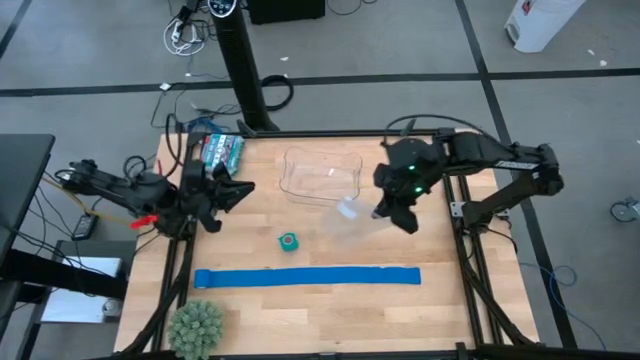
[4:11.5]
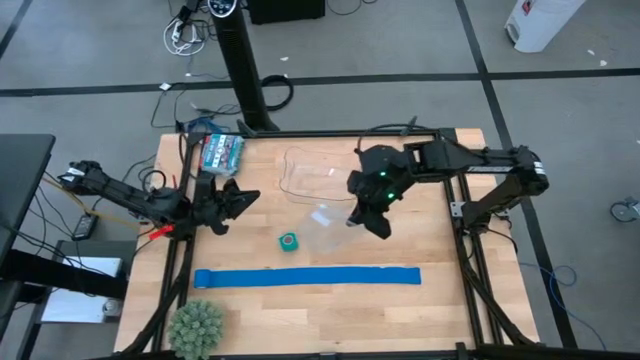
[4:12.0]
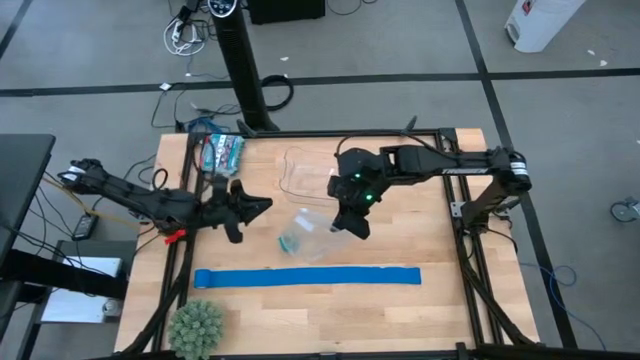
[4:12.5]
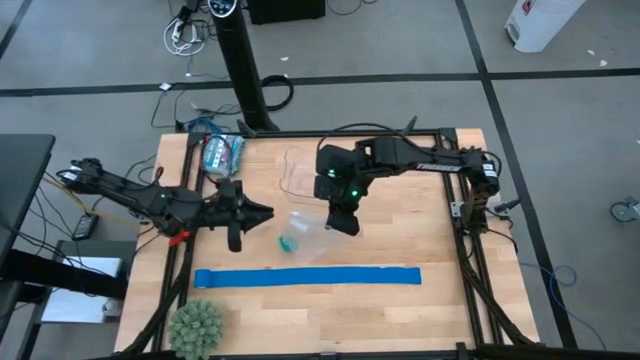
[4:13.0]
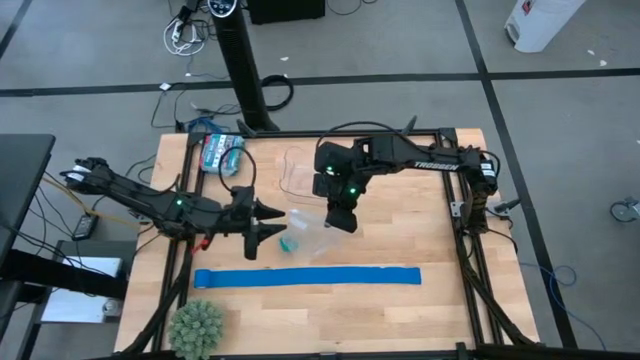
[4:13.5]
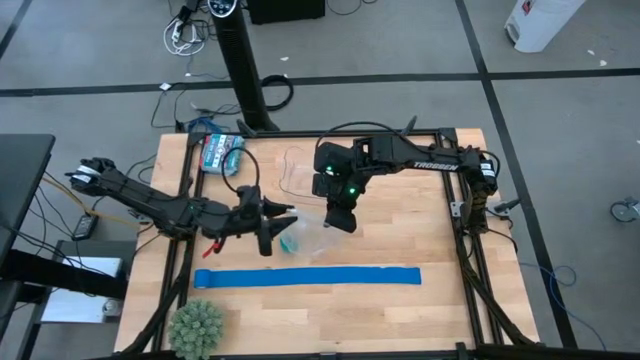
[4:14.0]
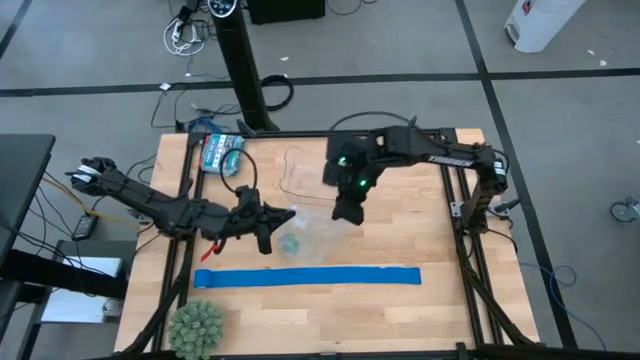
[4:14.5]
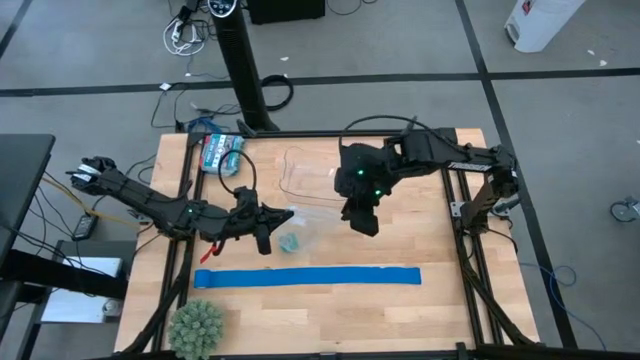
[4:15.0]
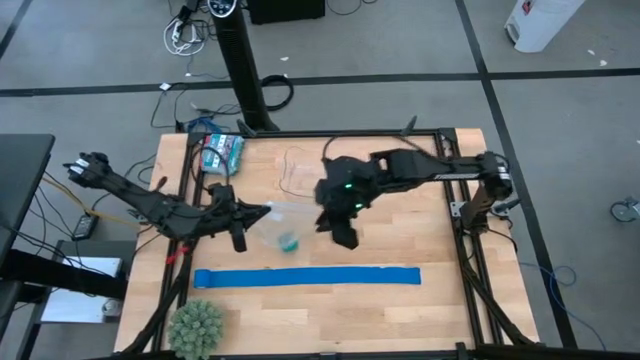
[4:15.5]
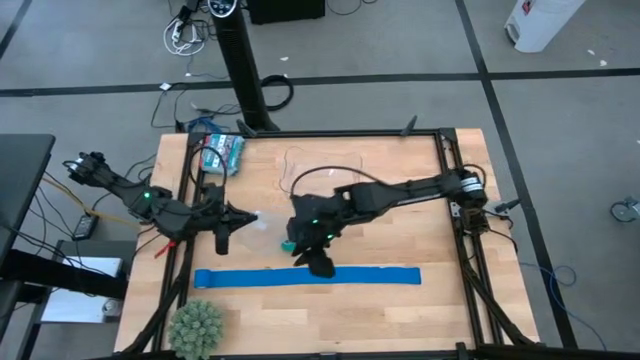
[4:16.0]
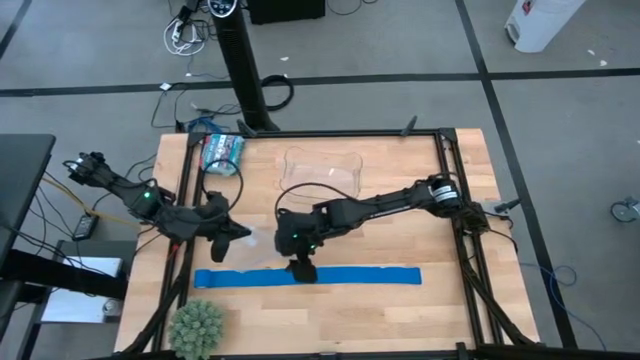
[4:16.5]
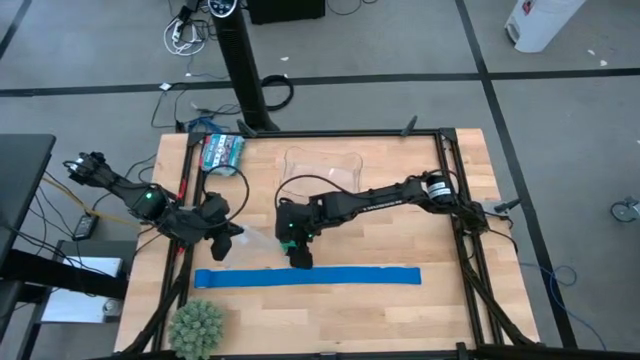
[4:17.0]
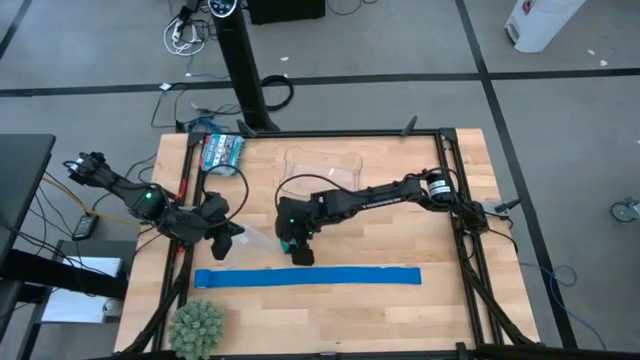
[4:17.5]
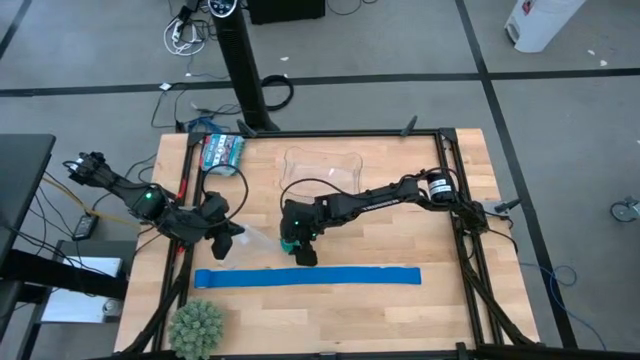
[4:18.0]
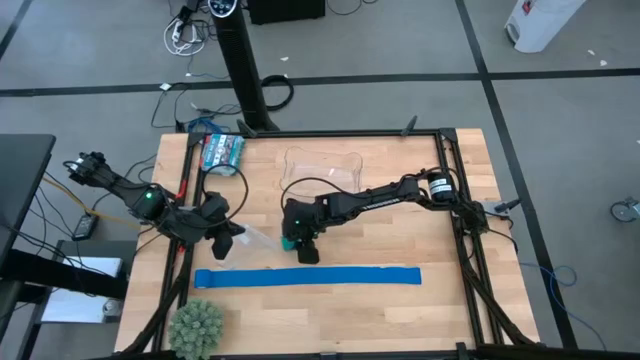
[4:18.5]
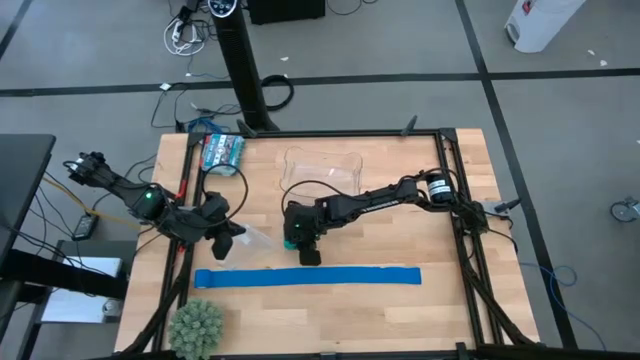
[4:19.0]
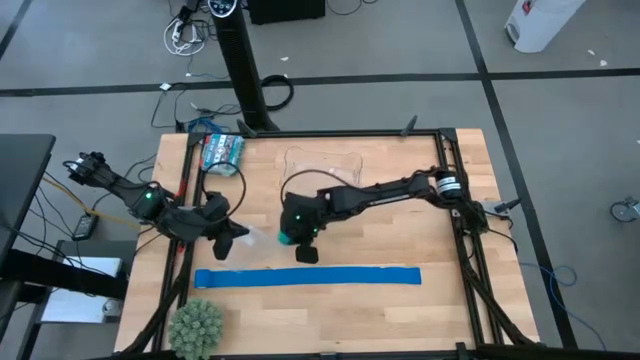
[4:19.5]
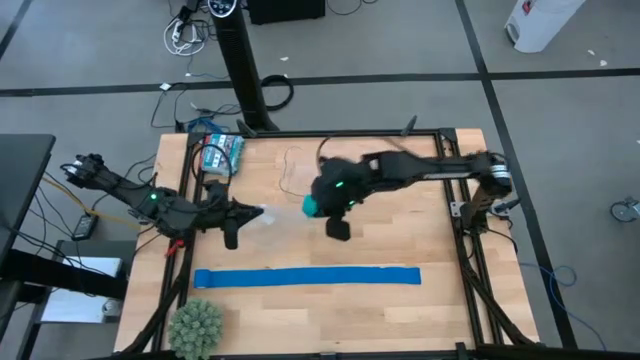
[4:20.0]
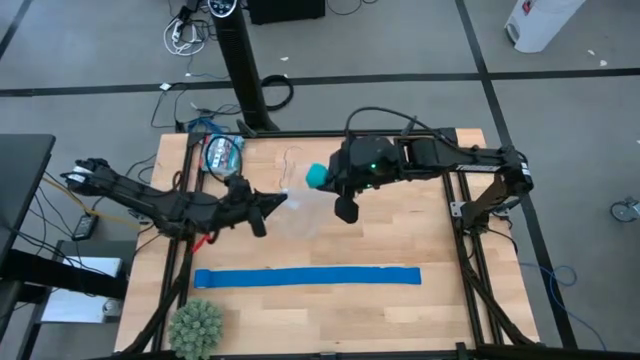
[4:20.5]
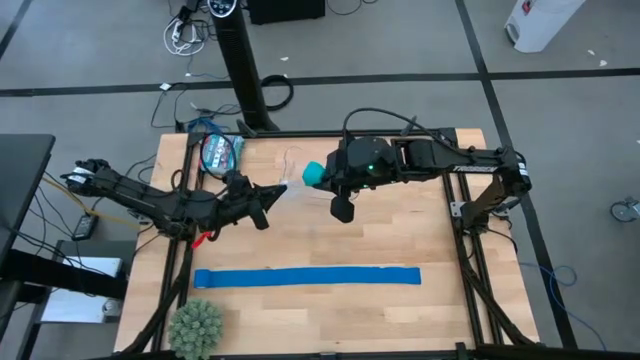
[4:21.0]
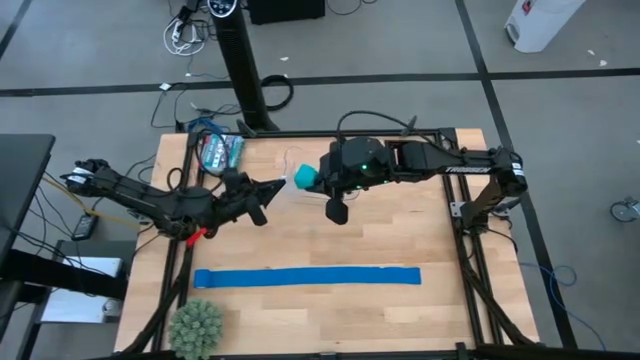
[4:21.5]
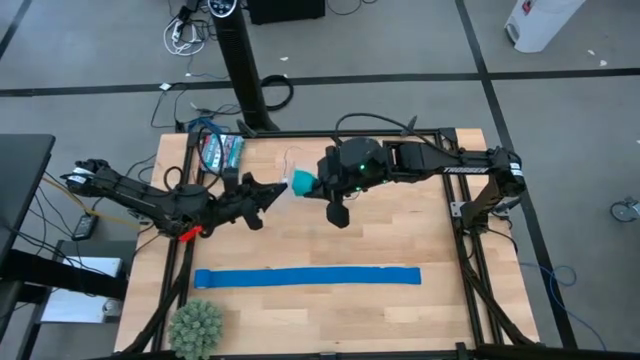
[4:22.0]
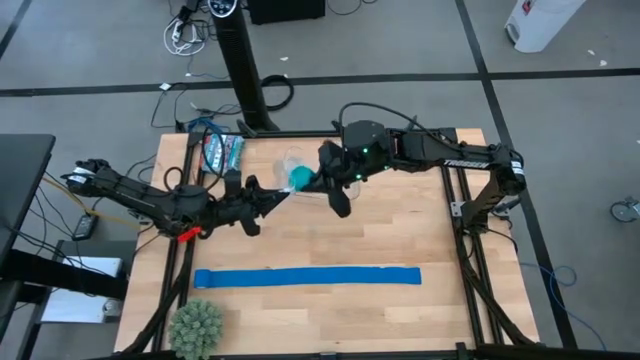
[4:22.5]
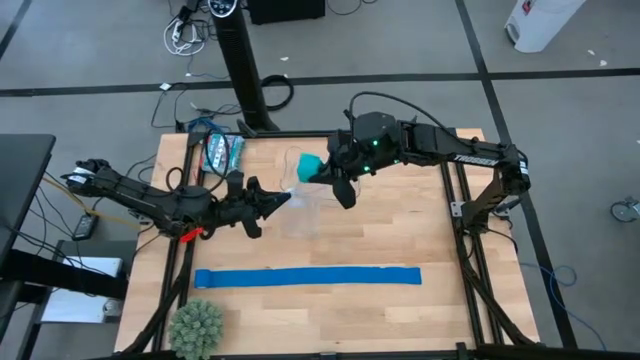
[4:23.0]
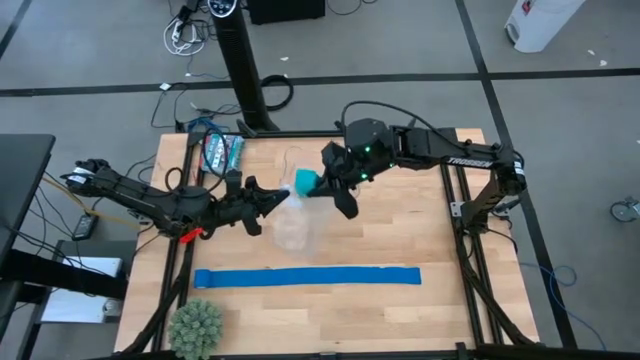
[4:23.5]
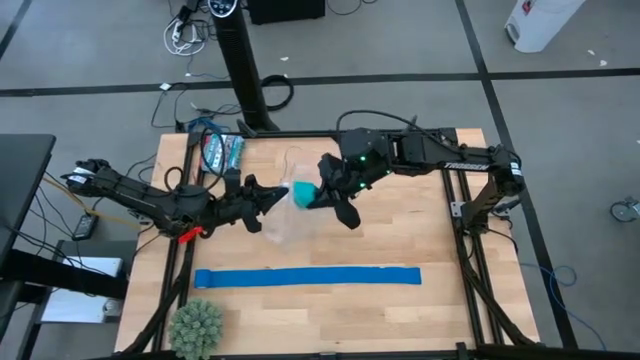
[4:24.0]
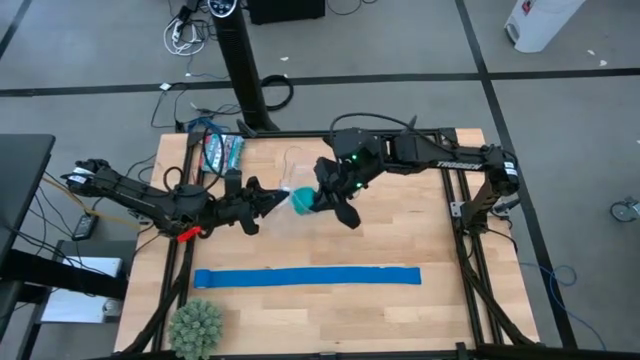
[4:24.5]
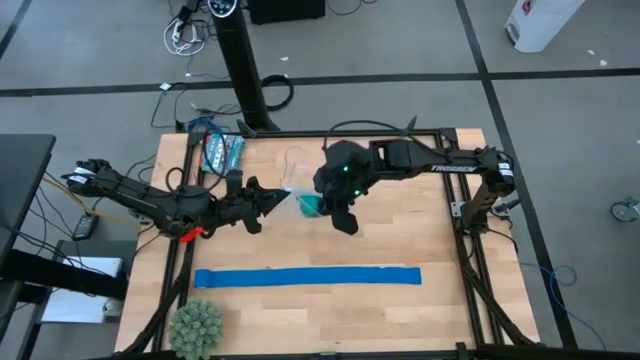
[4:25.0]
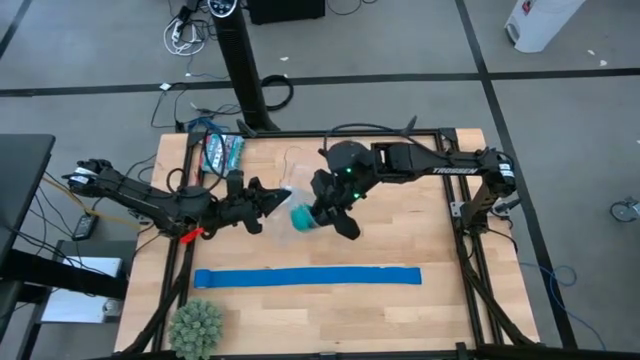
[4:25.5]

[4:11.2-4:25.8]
Task: Roll bandage
Put the green bandage into the transparent zip bag

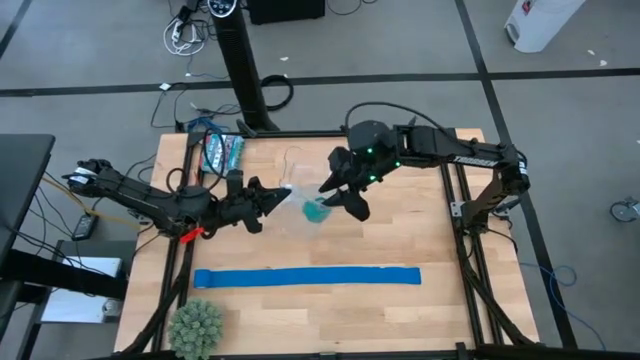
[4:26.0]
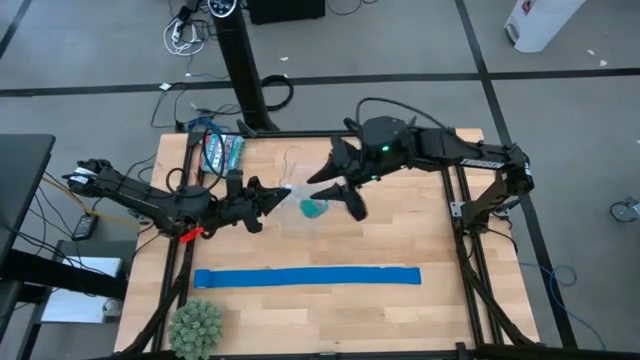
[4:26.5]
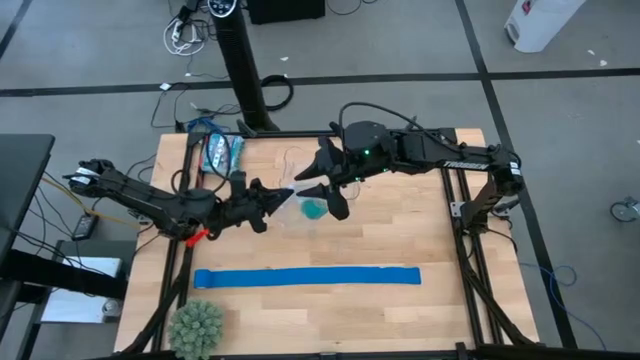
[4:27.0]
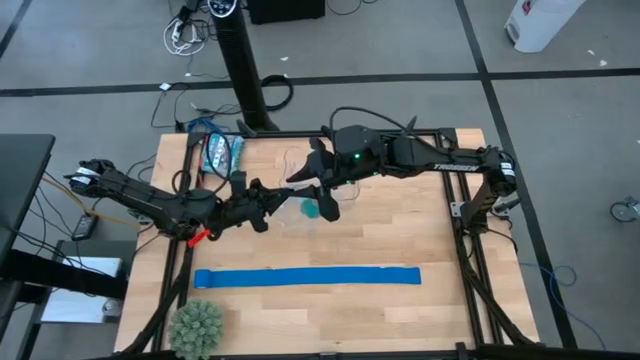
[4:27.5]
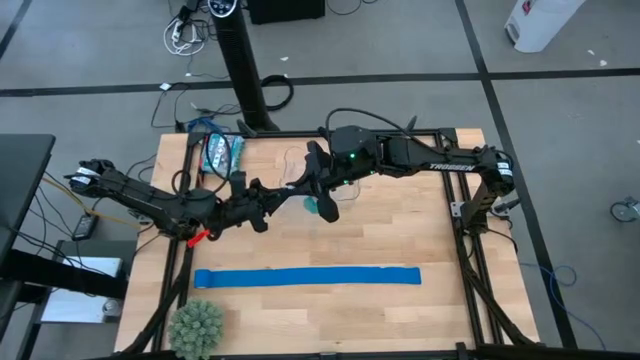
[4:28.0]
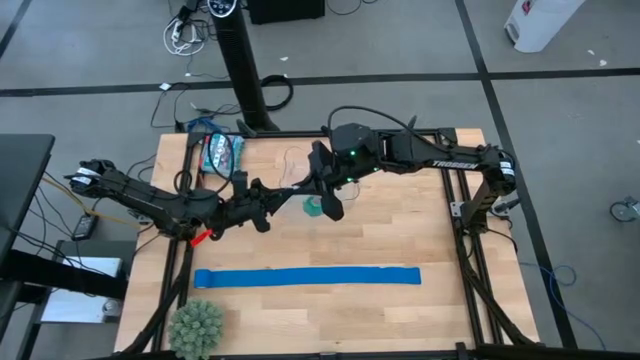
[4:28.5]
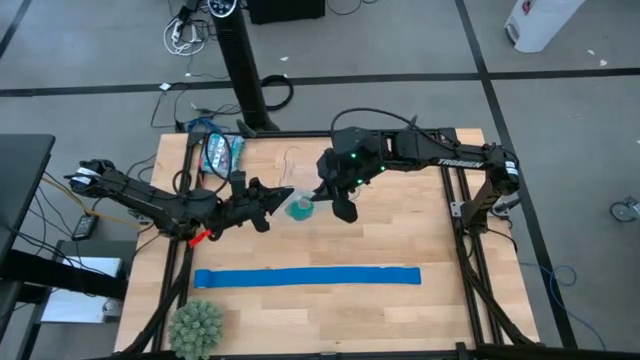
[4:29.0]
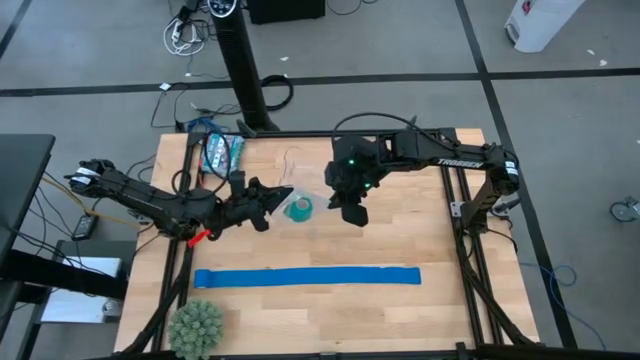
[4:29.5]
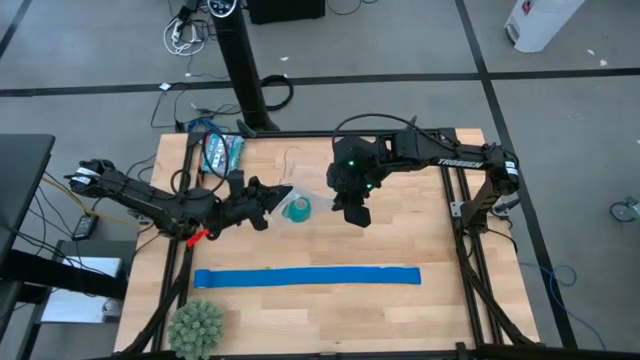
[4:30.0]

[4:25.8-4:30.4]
Close the transparent zip bag

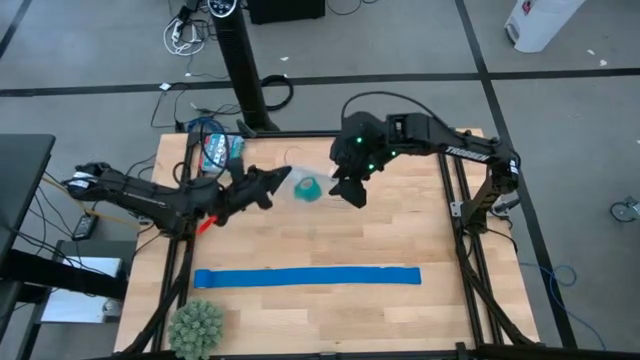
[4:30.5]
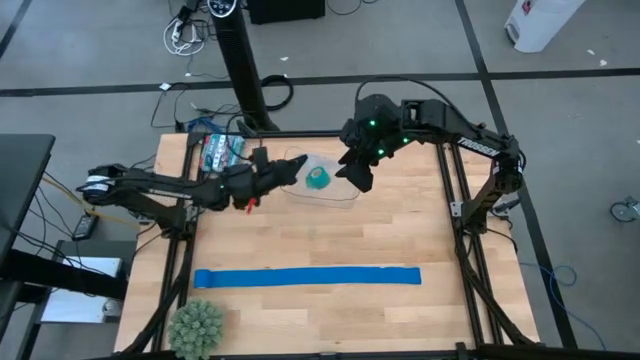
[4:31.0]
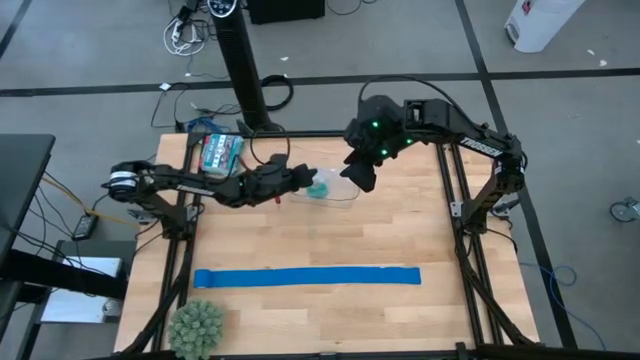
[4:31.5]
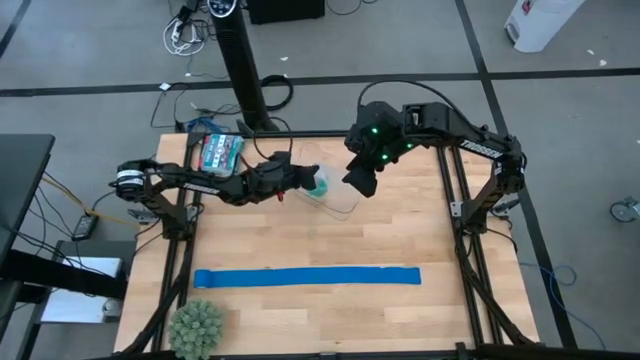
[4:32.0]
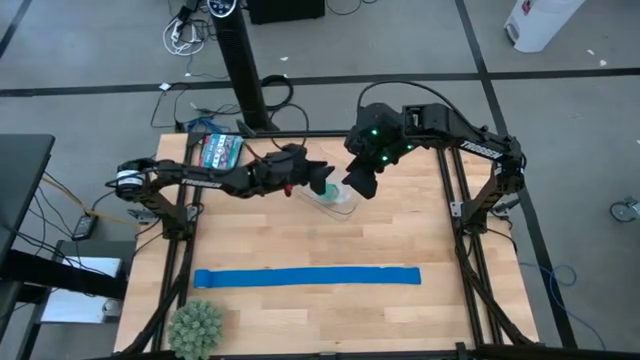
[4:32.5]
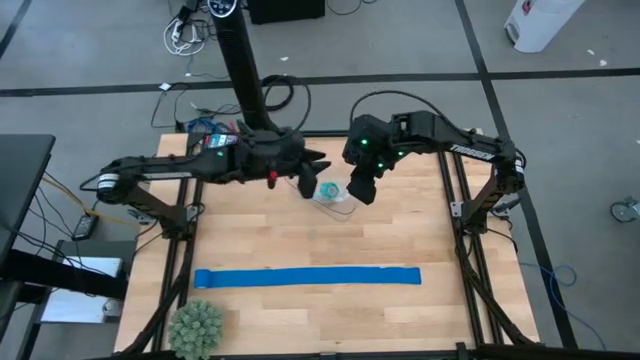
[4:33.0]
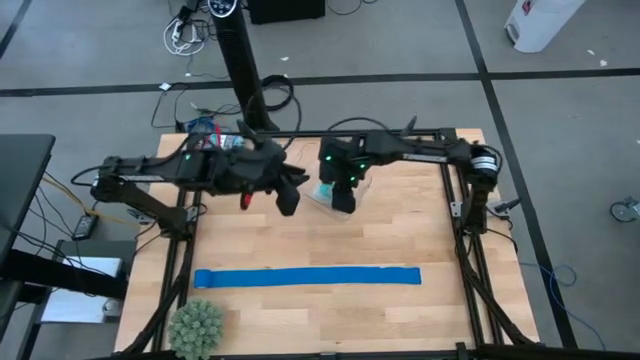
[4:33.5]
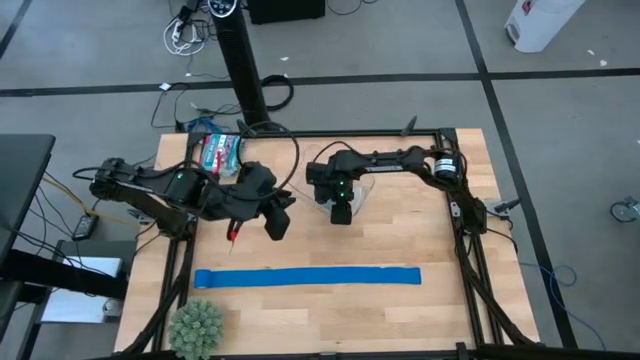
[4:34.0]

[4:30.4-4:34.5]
Put the packed green bandage into the transparent bin
